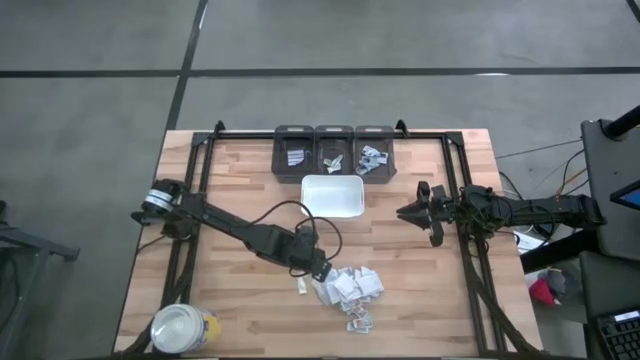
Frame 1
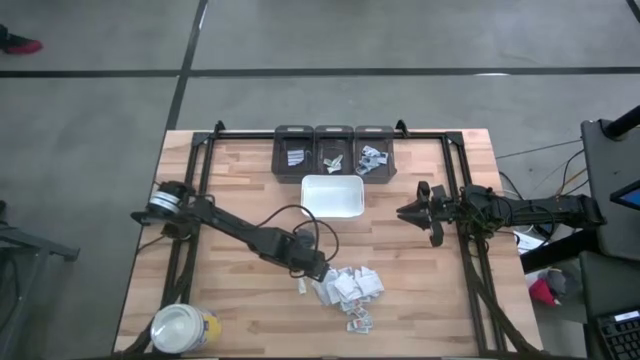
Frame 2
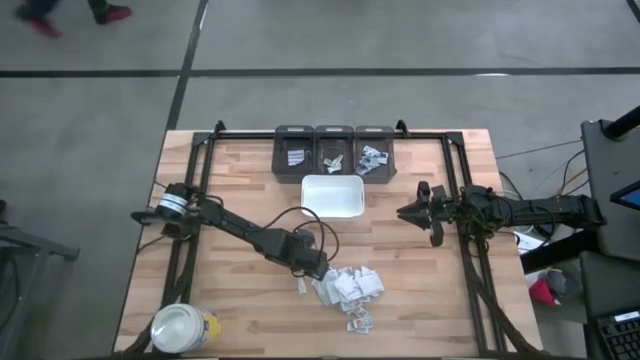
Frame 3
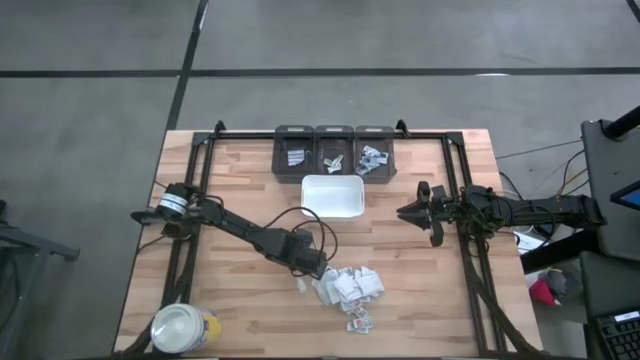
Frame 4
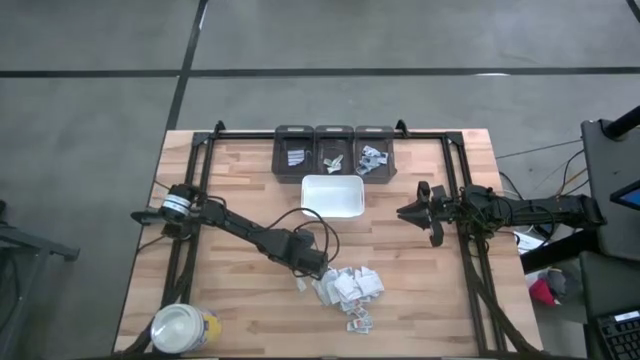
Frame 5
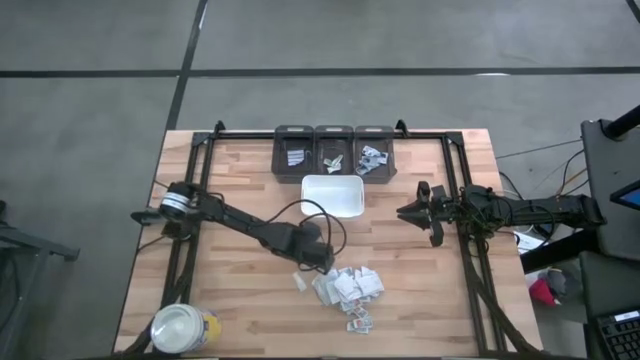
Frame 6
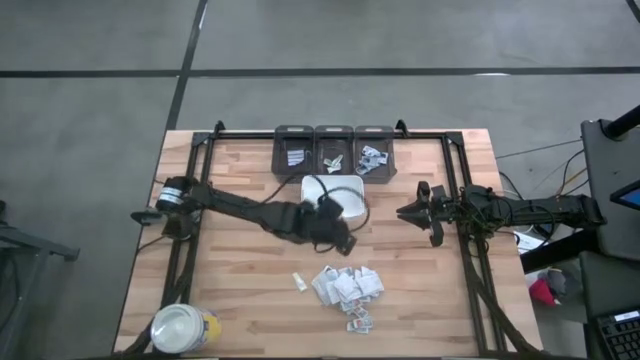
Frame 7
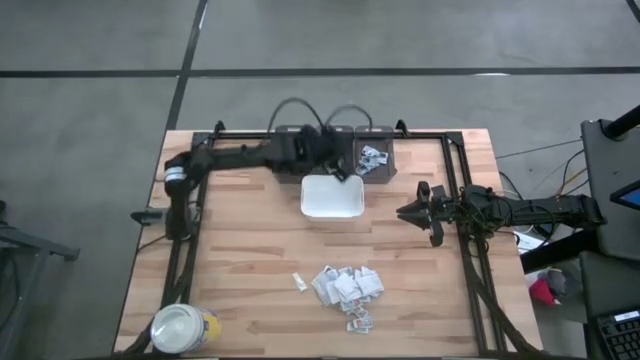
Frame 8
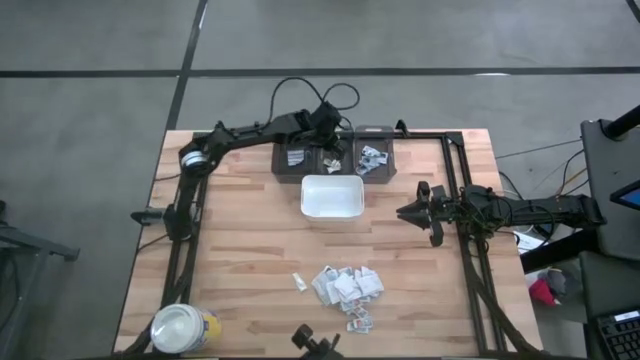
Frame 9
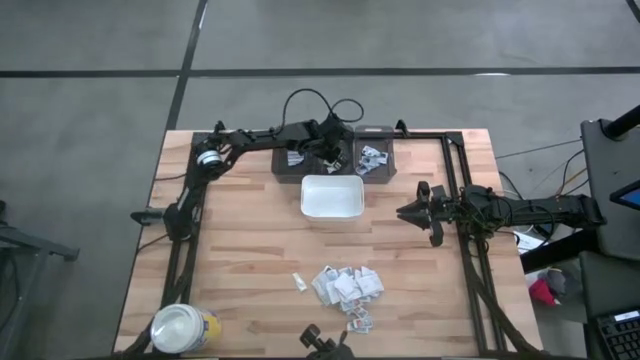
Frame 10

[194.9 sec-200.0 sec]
Task: Pick & Place First Aid Supplies
Put the green band aid into the middle black bin

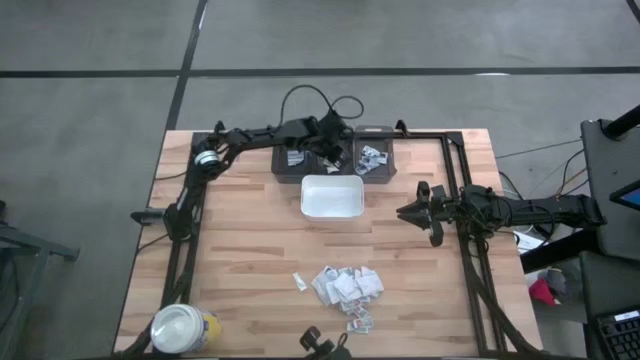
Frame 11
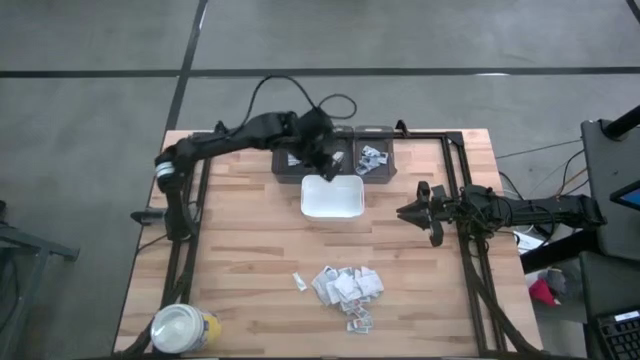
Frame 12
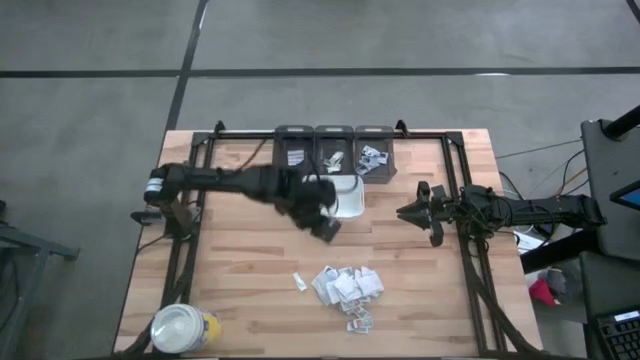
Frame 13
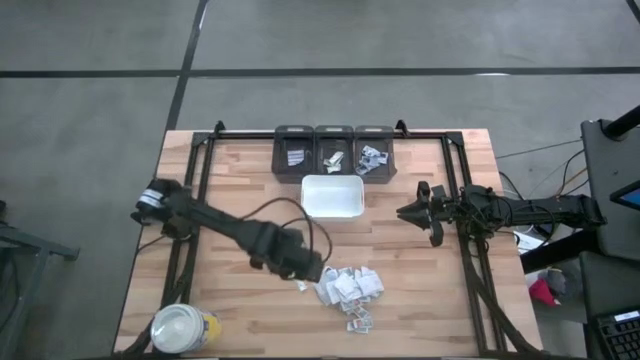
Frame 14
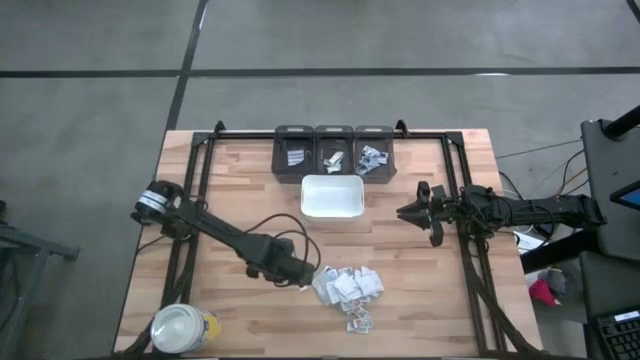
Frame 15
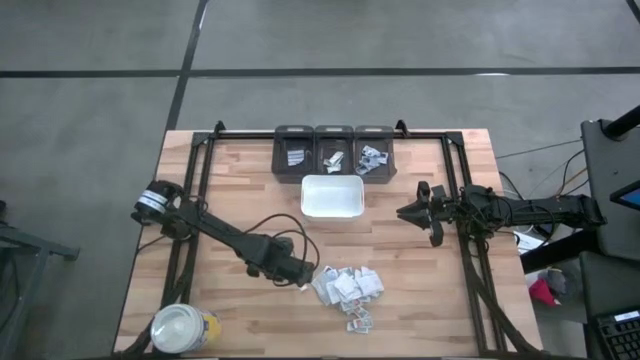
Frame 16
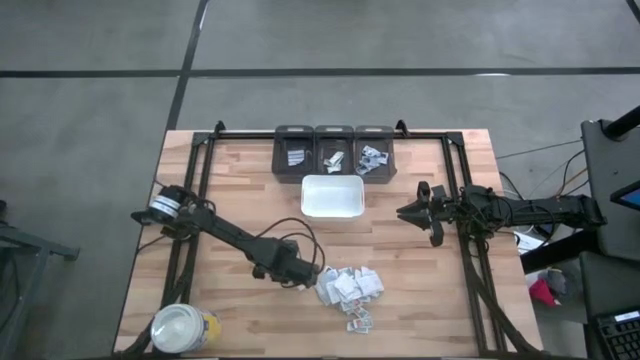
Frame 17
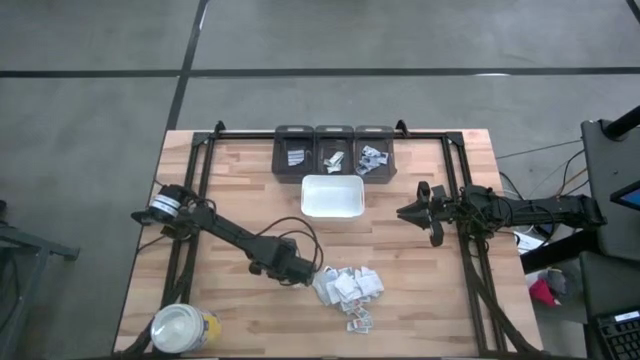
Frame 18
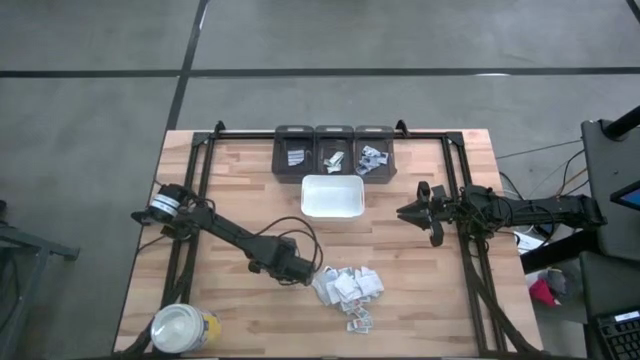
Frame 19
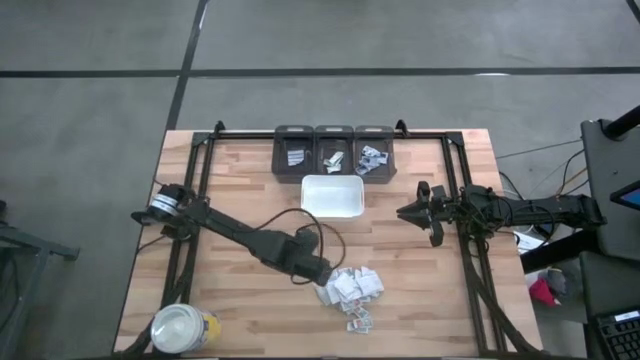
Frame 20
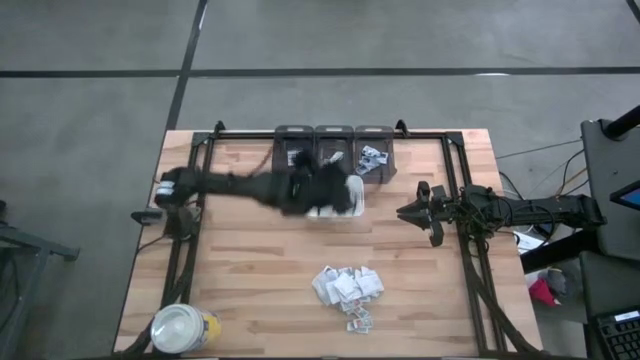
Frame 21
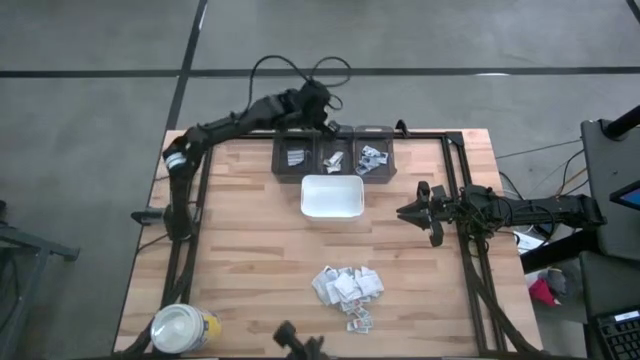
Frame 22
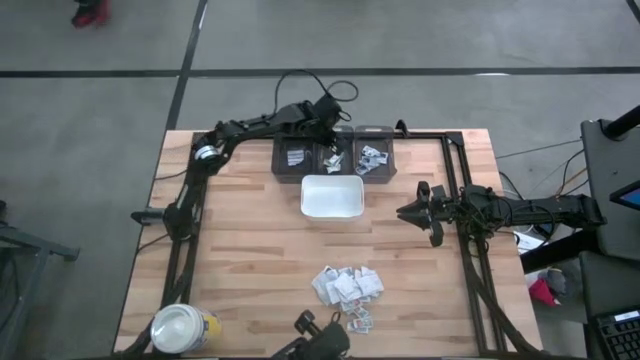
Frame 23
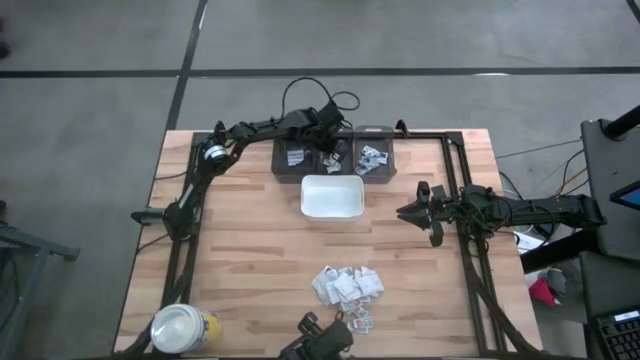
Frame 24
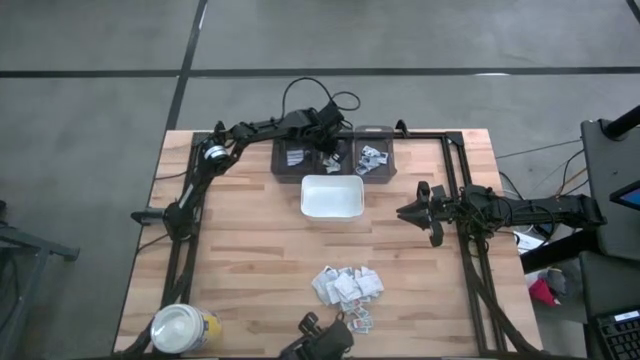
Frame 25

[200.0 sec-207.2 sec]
Put the green band aid into the middle black bin

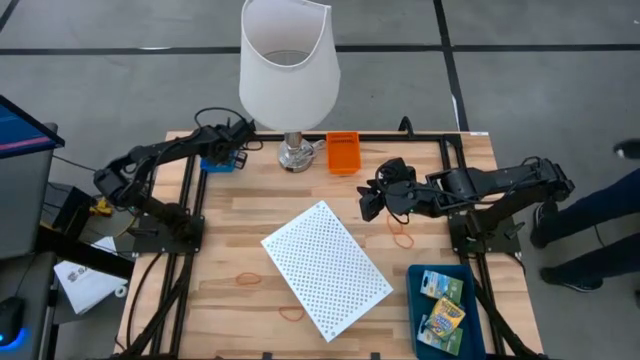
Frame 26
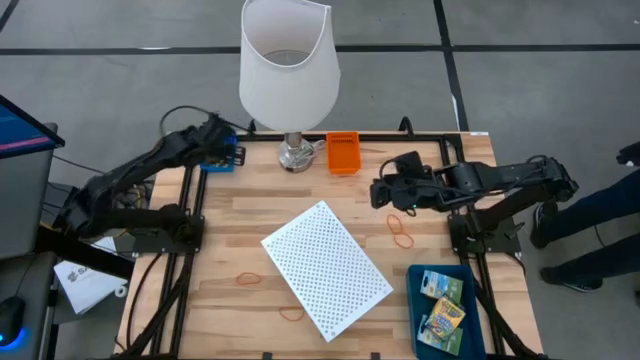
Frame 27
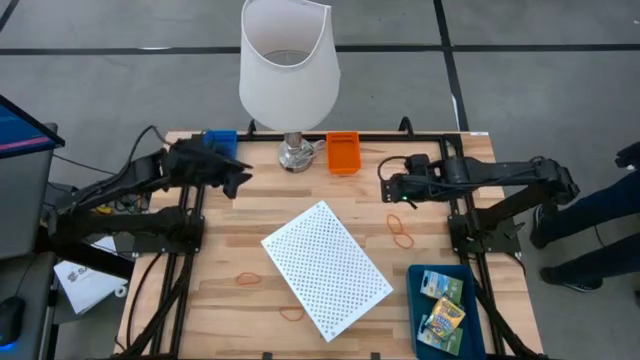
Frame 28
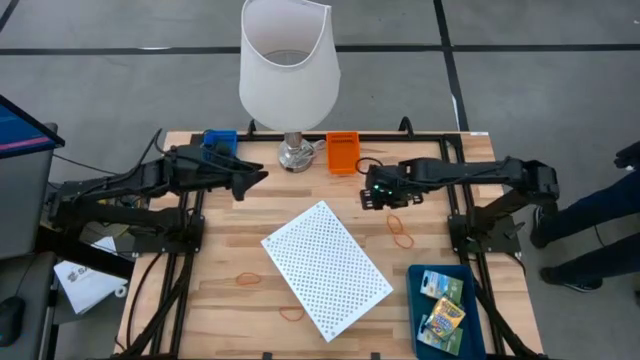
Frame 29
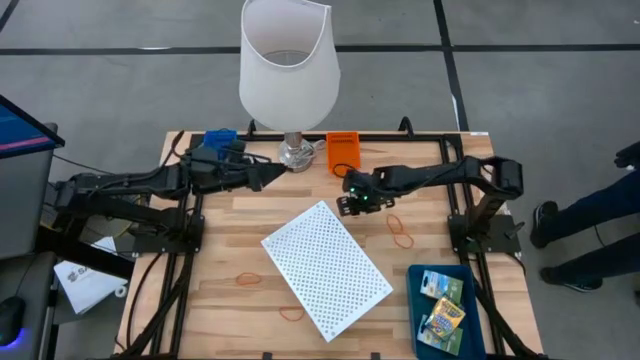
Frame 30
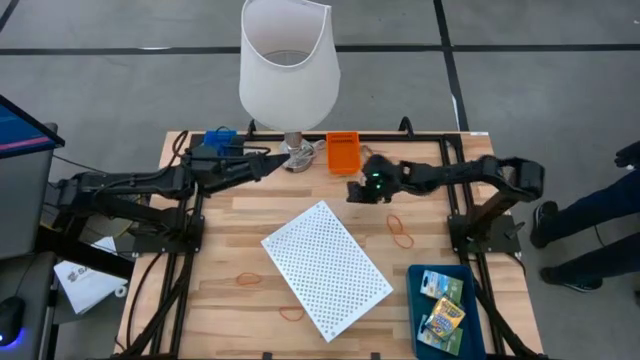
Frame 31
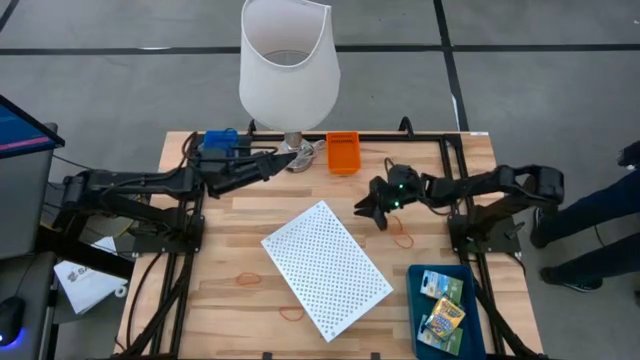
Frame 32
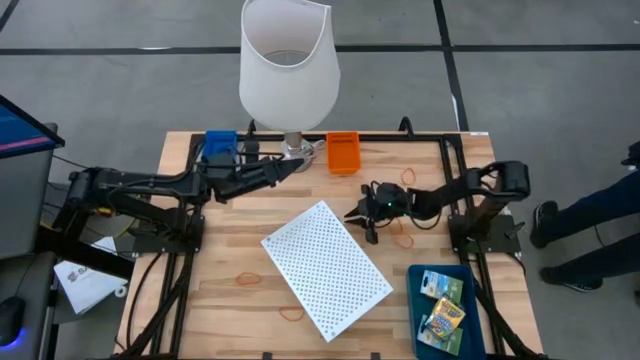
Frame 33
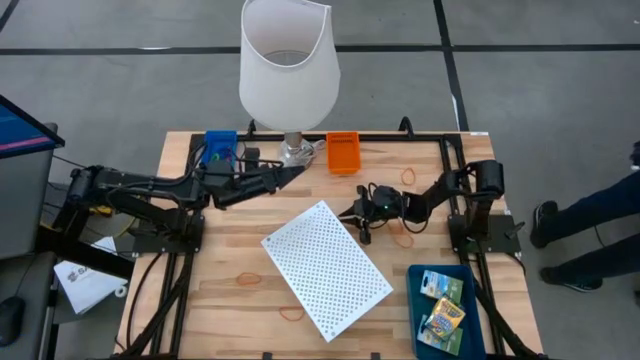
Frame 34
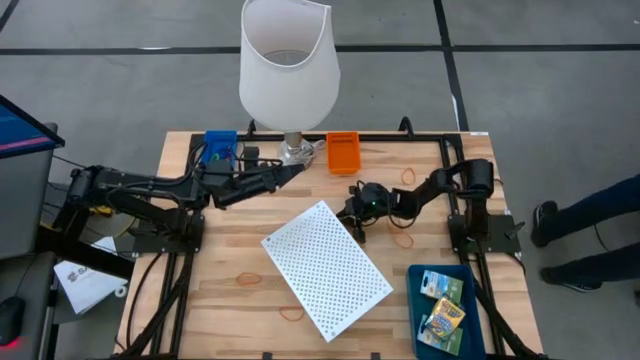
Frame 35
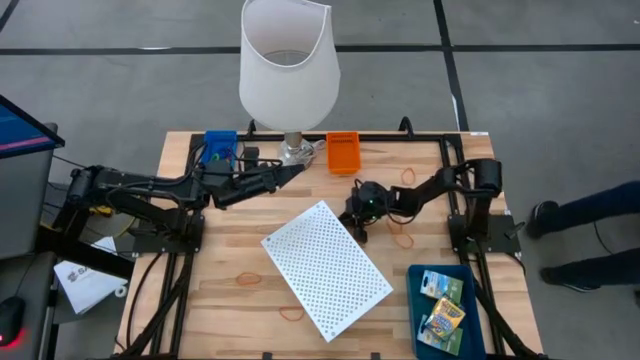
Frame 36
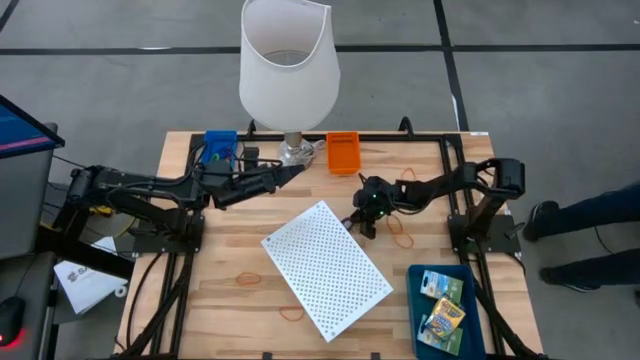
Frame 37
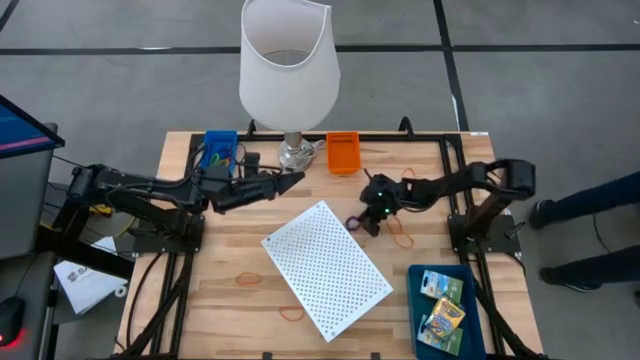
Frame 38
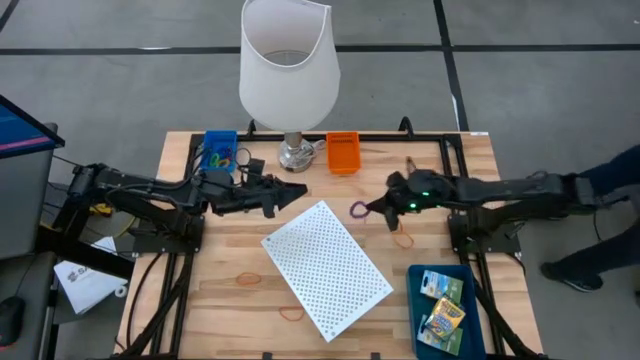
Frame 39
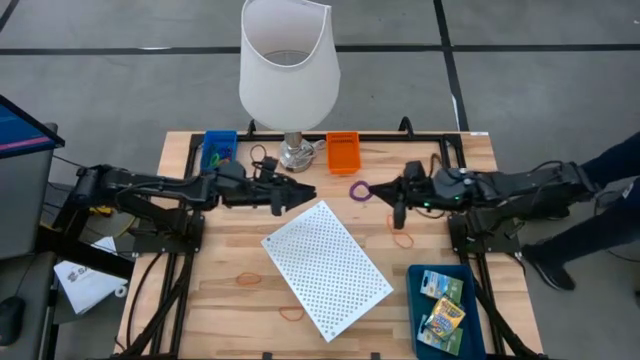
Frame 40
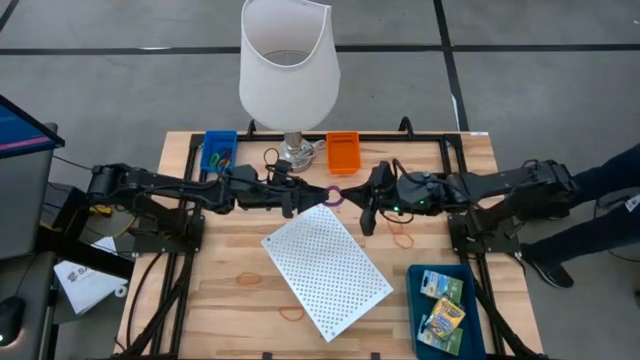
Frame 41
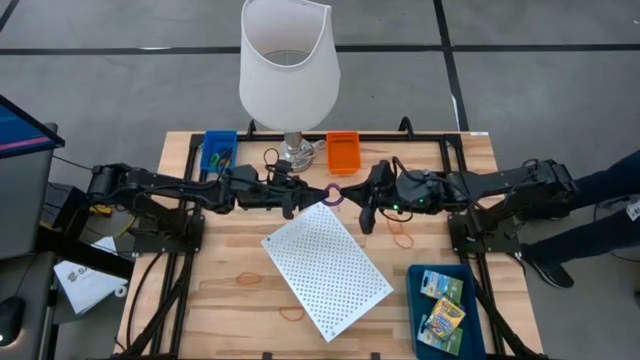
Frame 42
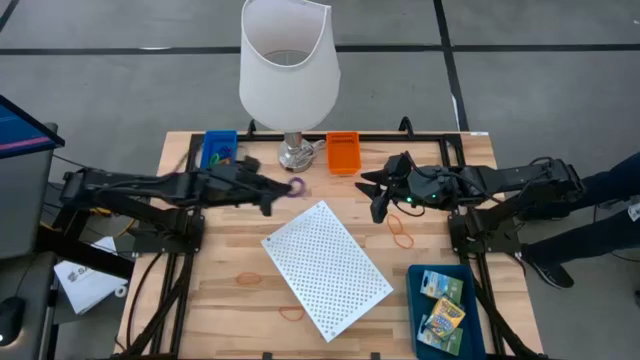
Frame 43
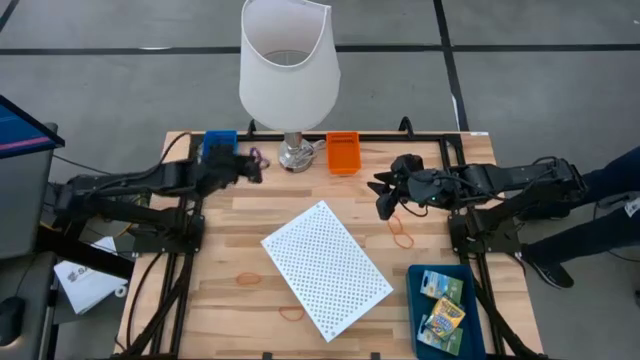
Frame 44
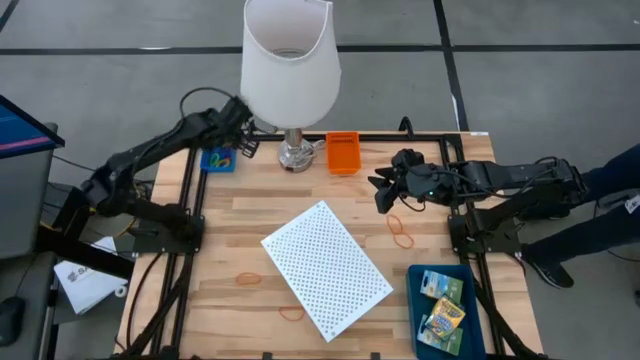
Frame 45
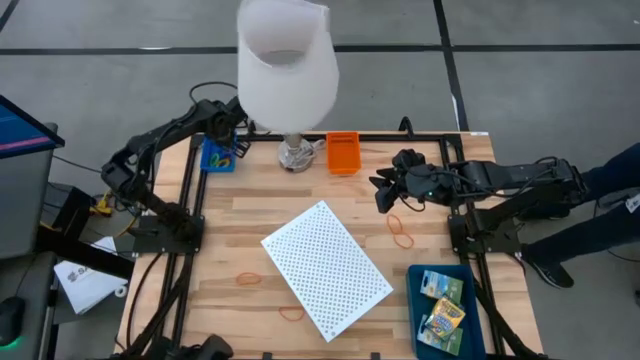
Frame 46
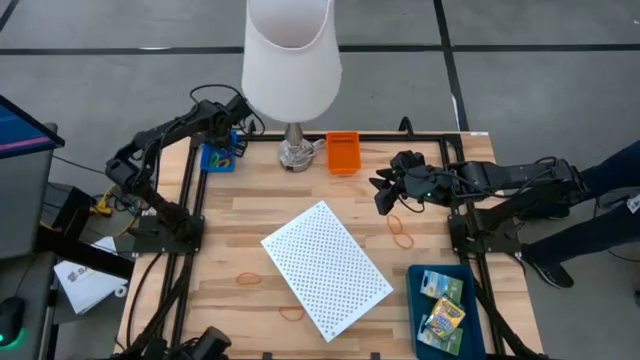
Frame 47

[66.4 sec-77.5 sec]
Task: Pick & Place Office Desk Supplies
Put the purple spring keychain into the blue bin
